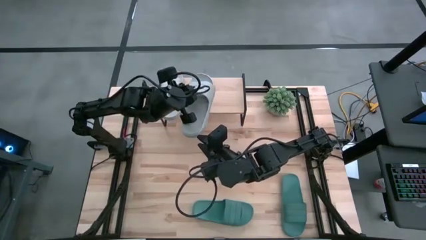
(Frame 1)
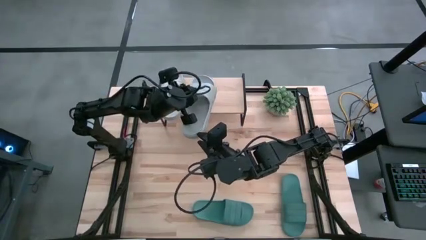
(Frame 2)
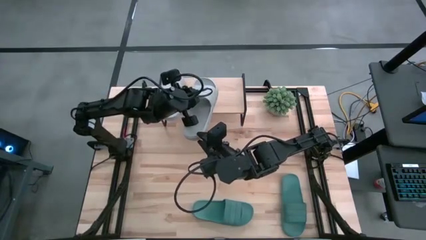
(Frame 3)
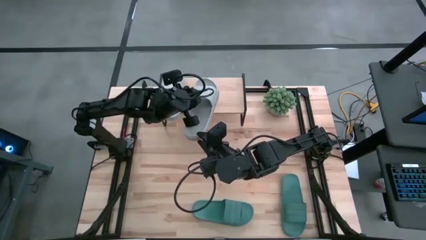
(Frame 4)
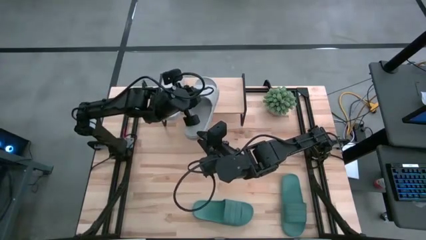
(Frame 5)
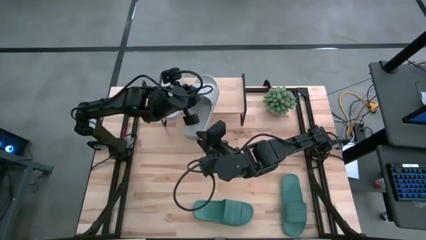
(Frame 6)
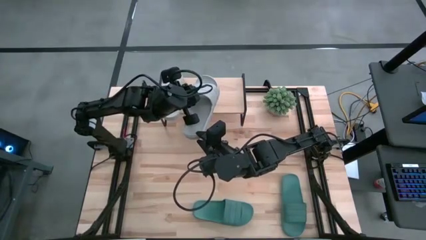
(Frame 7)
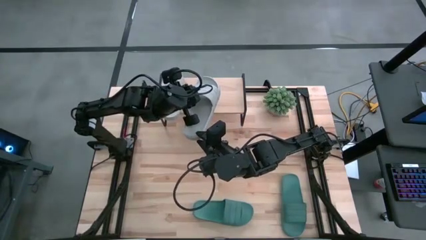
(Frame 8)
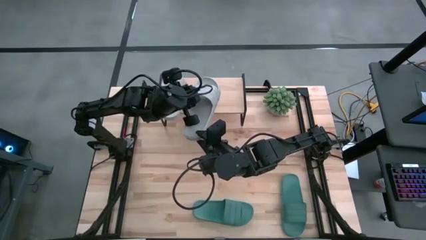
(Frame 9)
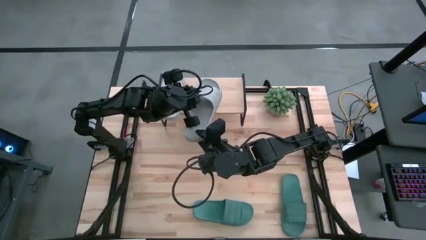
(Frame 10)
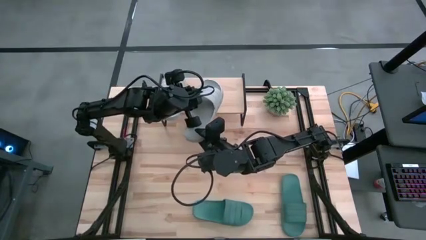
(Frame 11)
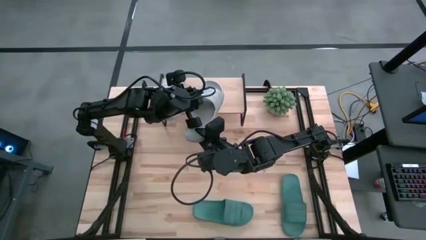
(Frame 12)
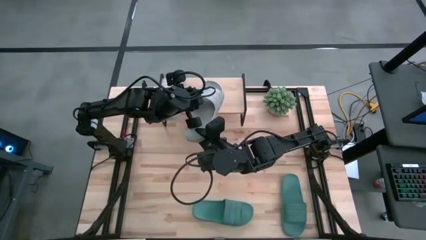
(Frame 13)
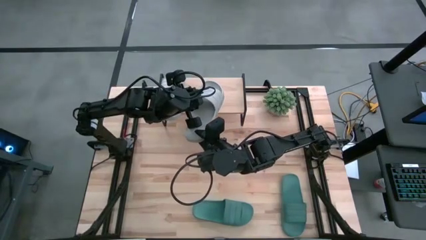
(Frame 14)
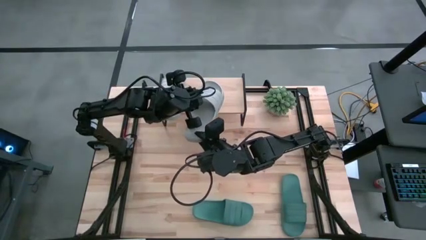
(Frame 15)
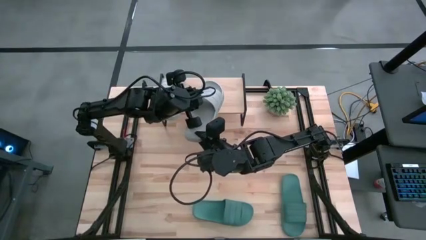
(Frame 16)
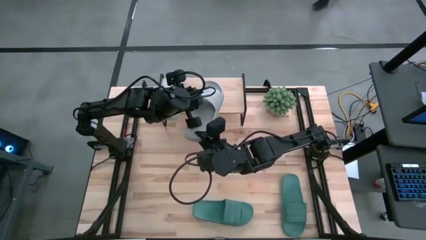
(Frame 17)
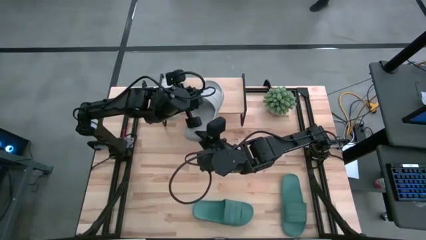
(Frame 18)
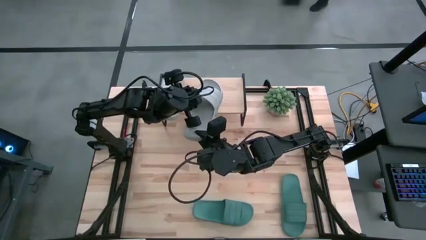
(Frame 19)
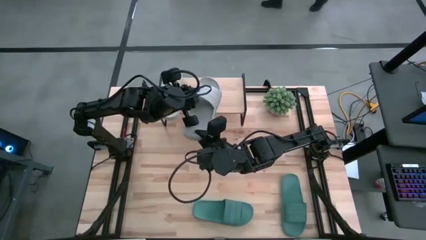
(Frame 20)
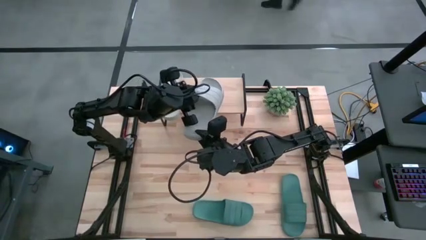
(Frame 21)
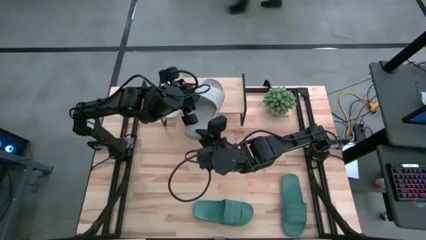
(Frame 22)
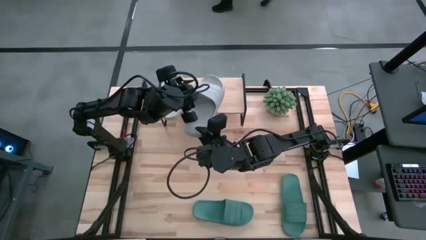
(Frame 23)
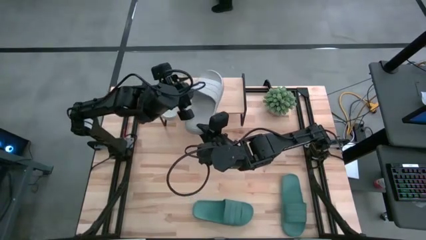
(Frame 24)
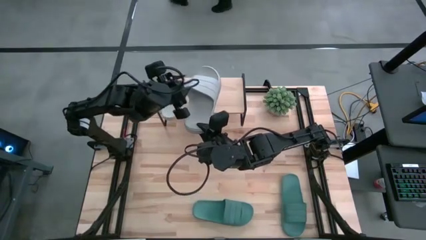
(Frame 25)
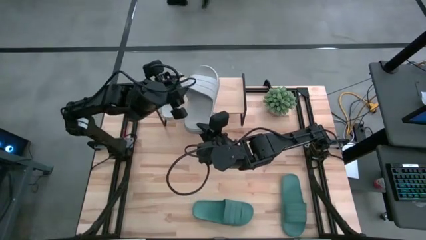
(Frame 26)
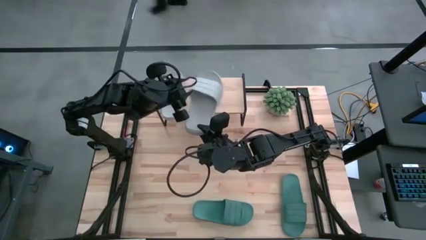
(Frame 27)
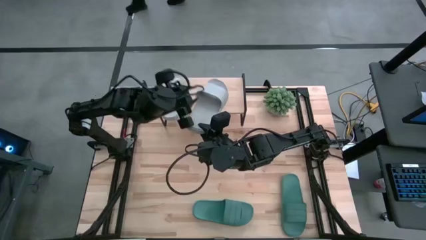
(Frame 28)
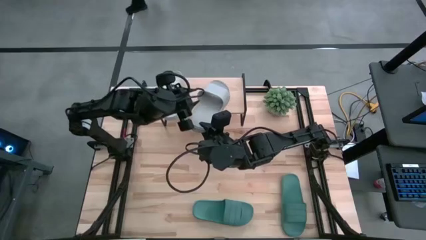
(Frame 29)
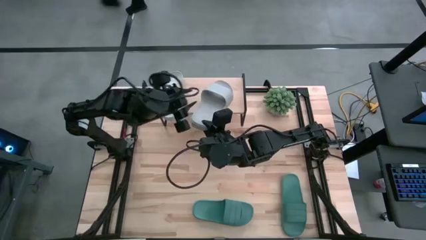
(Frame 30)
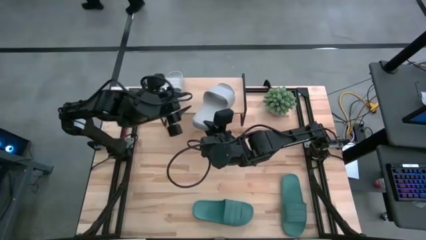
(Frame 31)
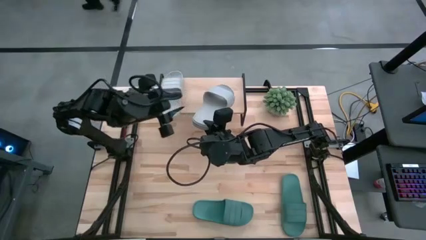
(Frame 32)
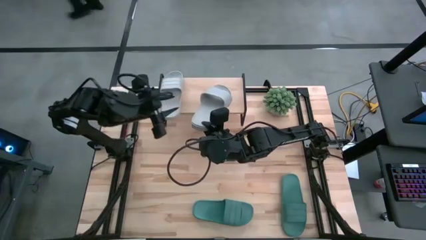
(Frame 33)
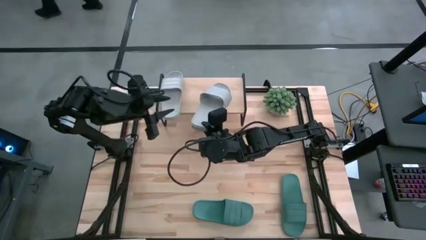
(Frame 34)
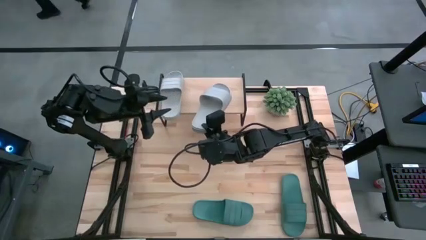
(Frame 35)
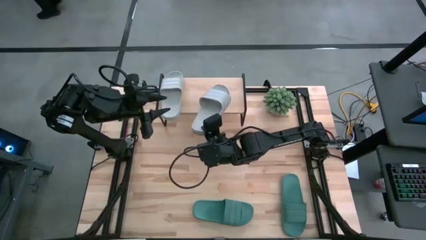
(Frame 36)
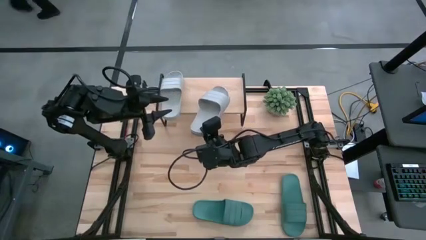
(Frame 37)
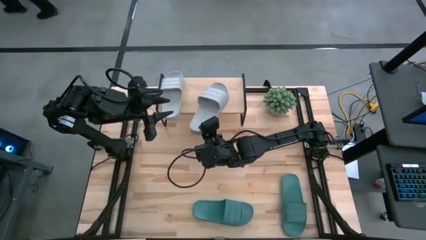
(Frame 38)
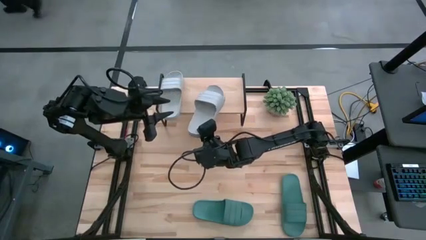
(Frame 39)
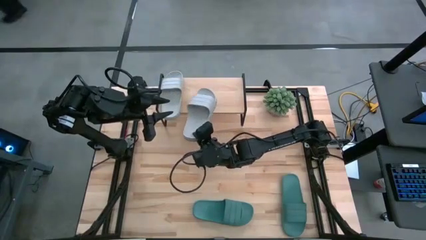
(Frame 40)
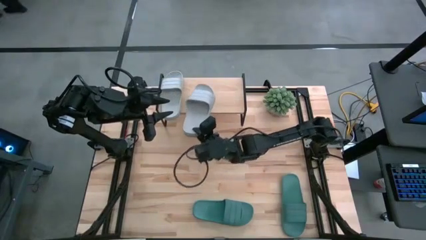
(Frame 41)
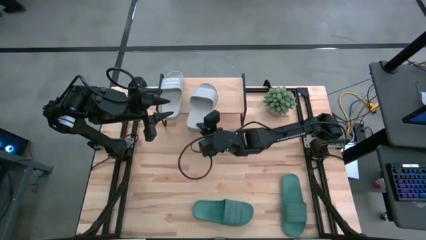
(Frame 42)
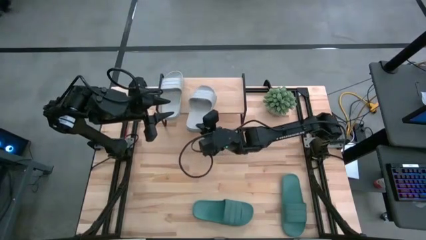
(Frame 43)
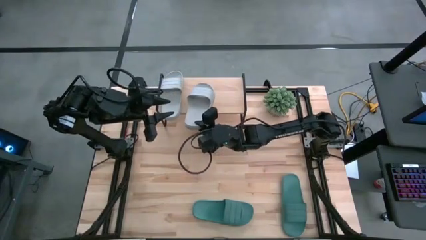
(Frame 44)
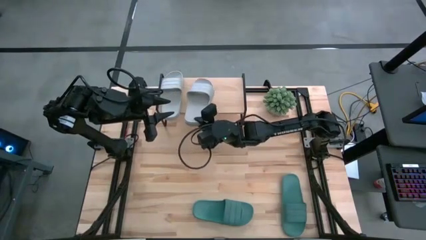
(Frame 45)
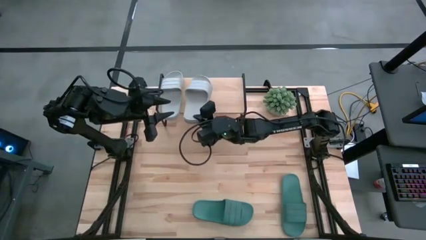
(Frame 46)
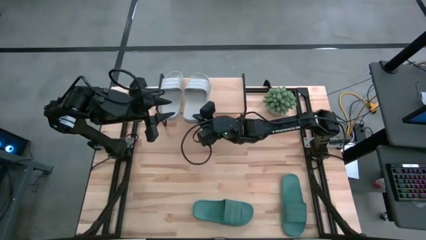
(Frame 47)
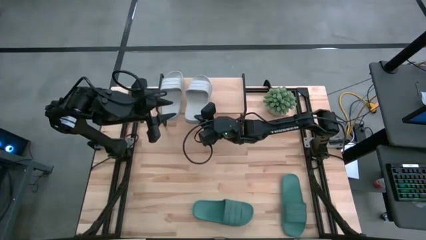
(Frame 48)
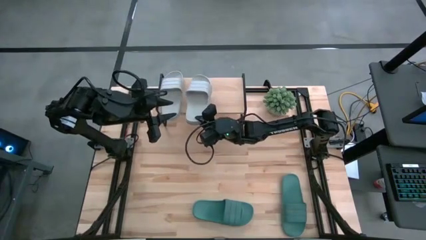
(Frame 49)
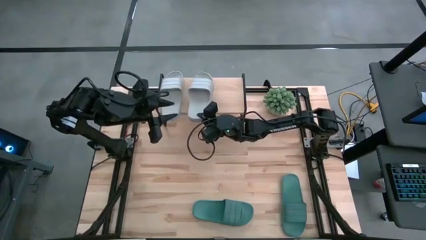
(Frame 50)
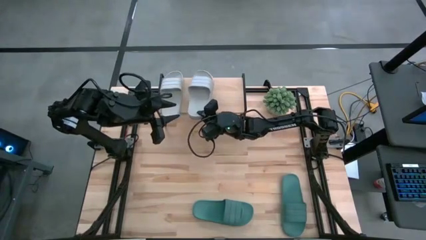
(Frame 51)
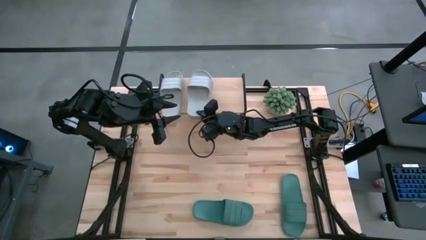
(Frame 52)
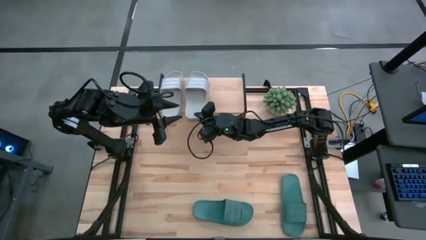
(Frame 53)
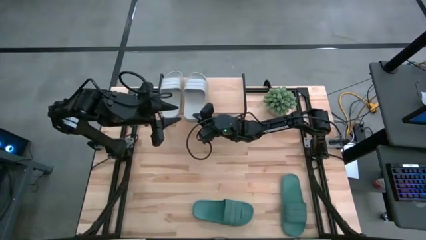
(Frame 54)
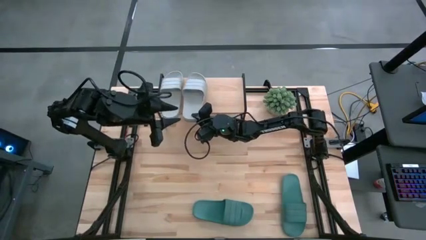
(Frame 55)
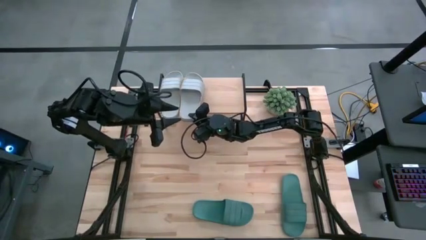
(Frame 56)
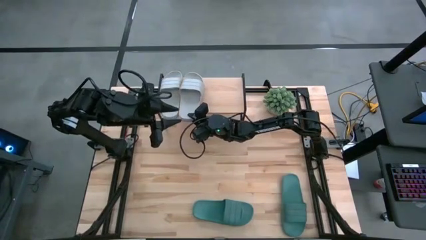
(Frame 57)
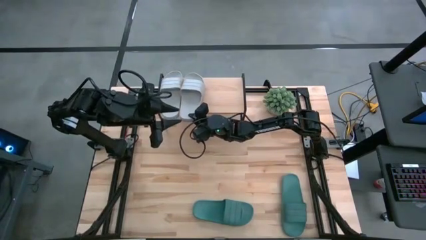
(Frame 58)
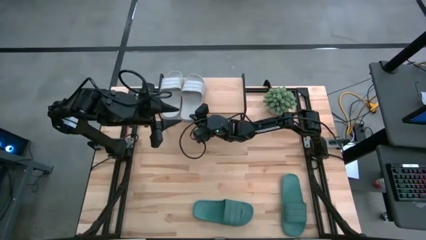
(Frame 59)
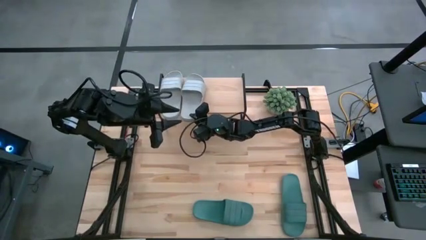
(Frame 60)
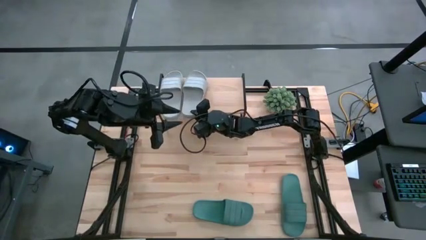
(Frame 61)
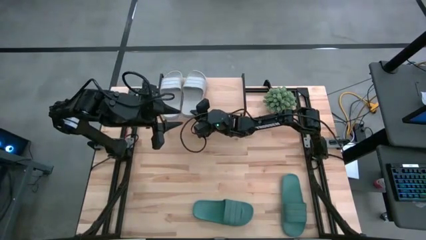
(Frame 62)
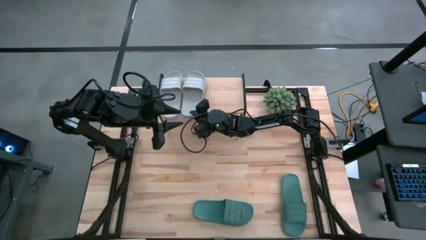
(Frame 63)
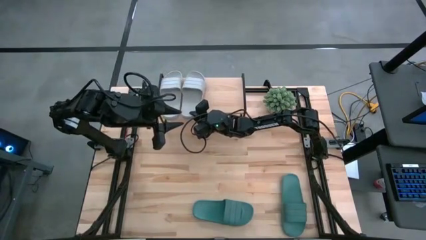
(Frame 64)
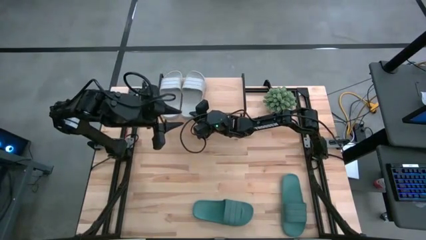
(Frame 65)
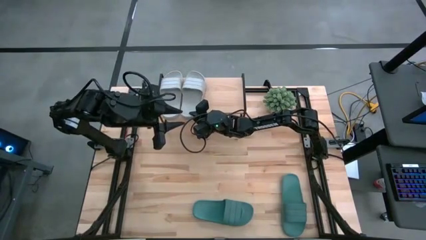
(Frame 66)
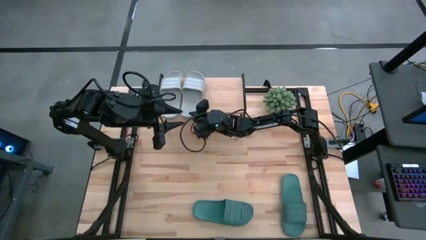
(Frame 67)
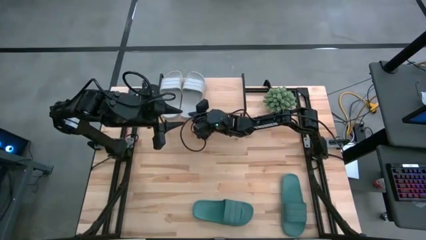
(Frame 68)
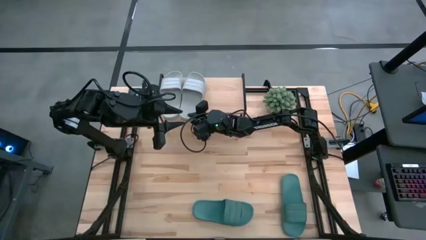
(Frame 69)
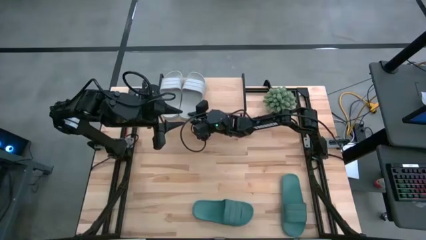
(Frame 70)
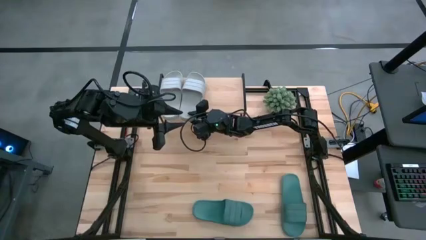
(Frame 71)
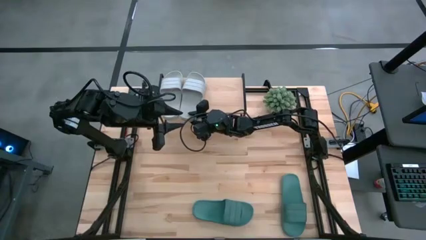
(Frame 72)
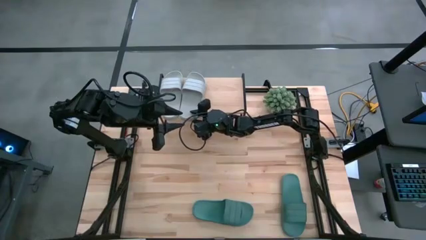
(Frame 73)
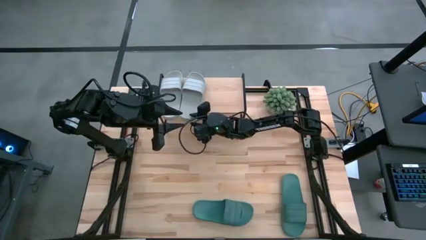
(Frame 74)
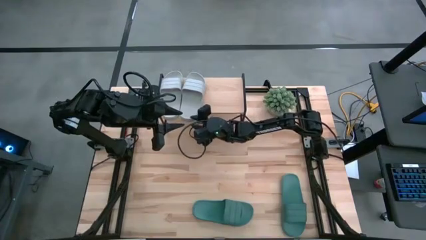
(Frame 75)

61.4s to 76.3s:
Task: Pick and place slides into the shelf
Put the gray slipper on the shelf
